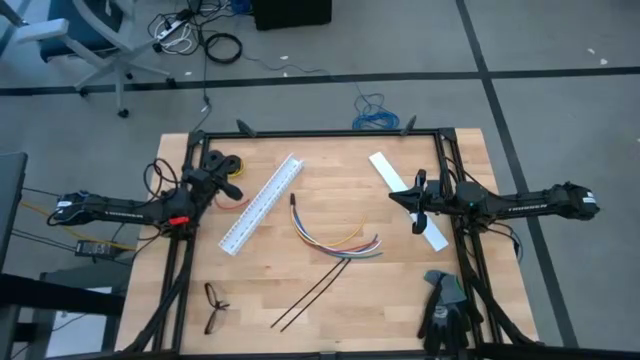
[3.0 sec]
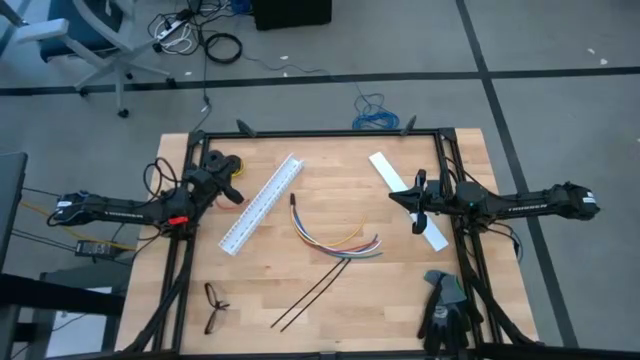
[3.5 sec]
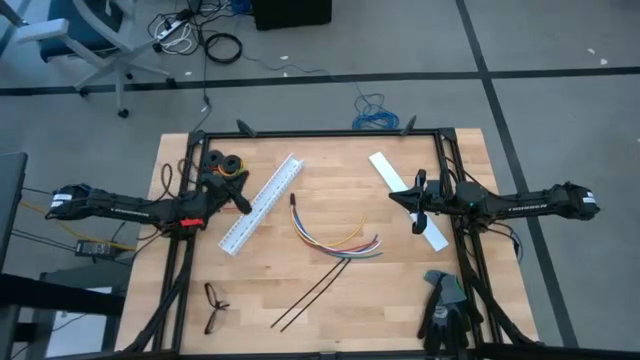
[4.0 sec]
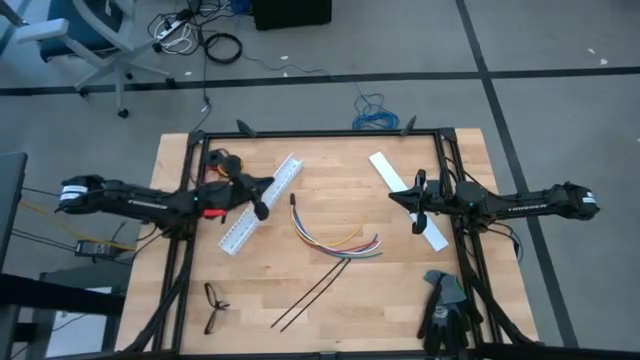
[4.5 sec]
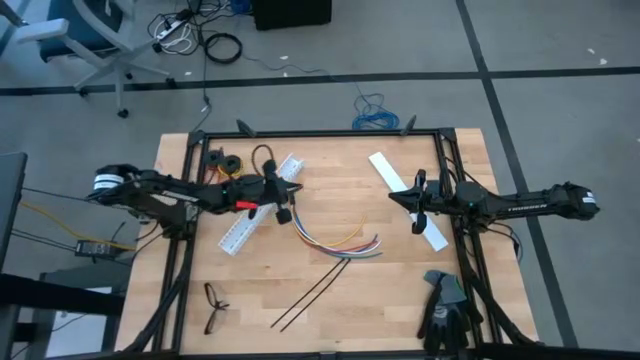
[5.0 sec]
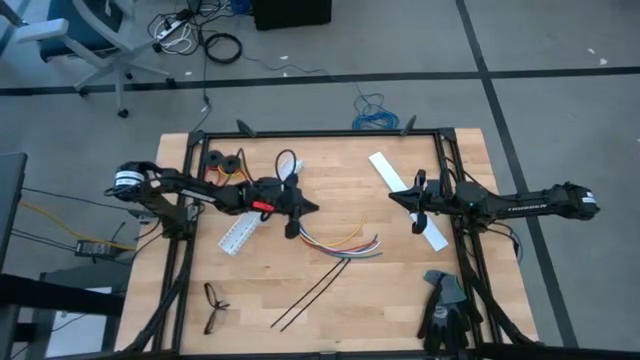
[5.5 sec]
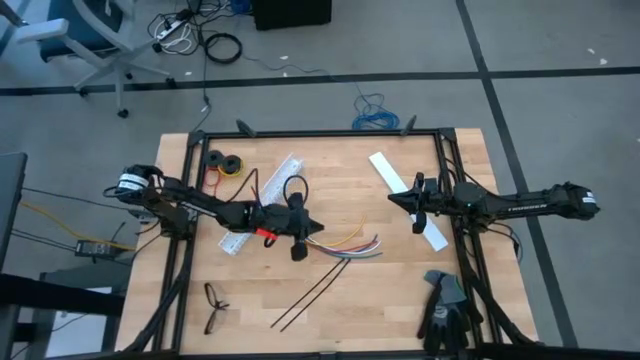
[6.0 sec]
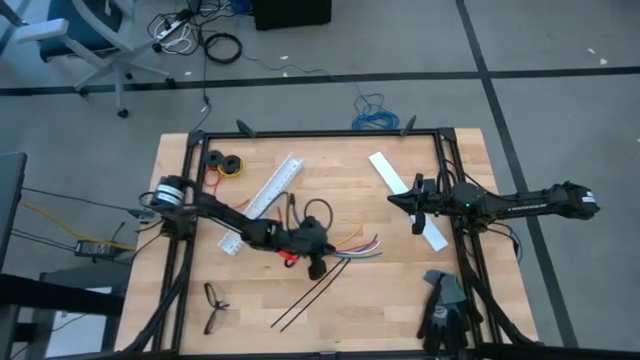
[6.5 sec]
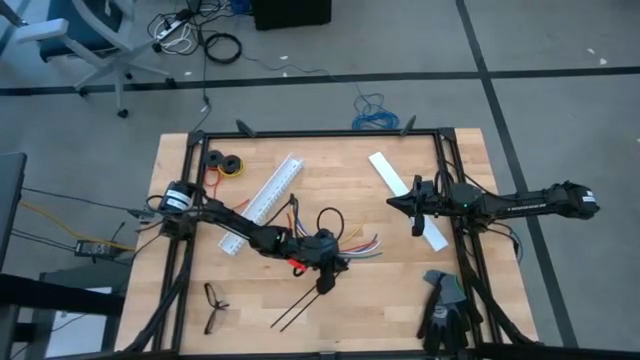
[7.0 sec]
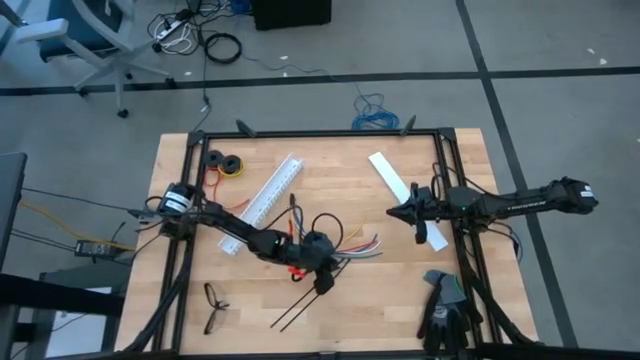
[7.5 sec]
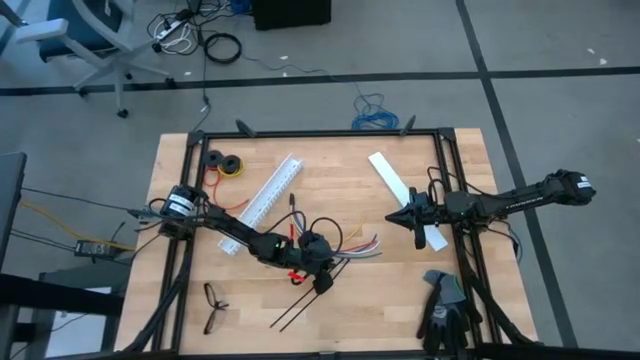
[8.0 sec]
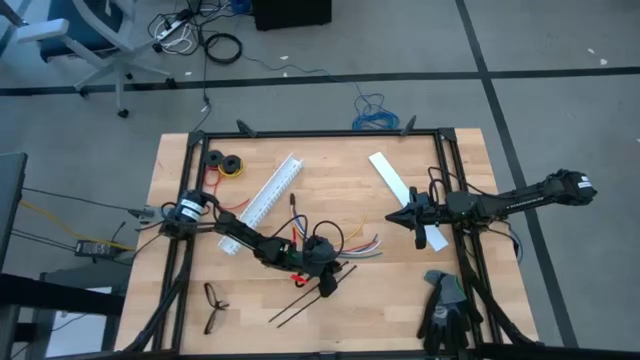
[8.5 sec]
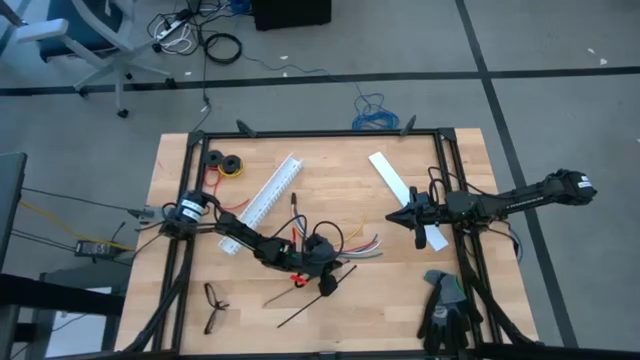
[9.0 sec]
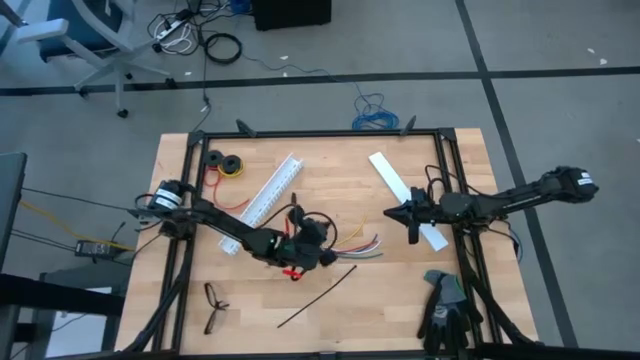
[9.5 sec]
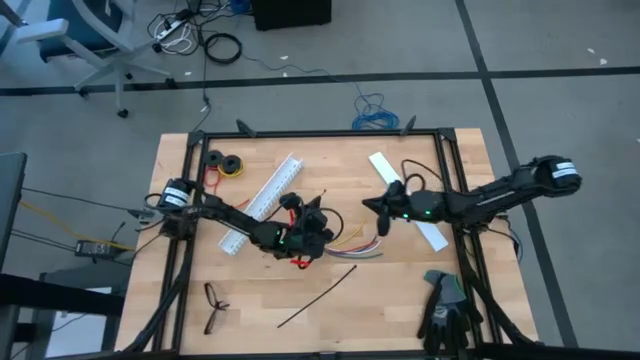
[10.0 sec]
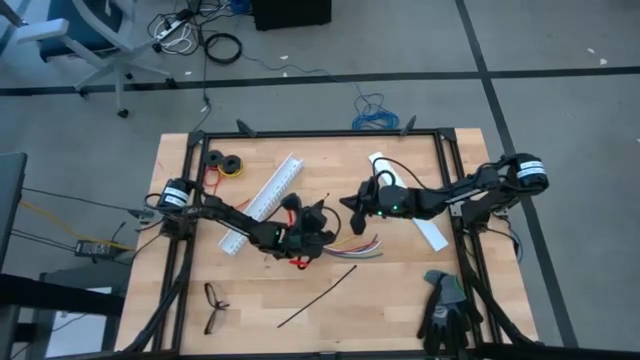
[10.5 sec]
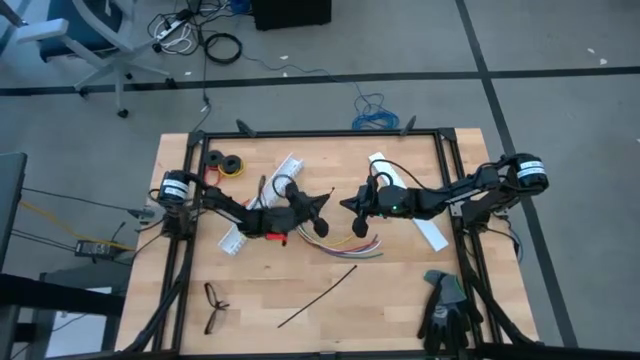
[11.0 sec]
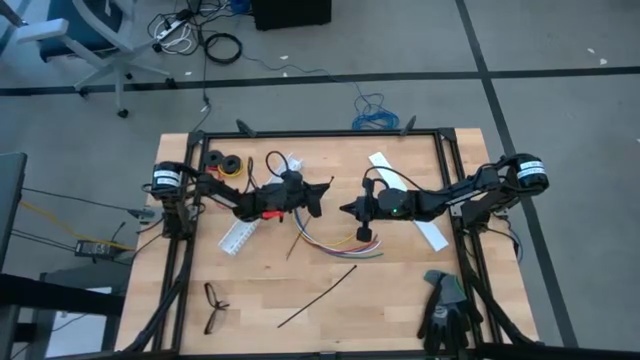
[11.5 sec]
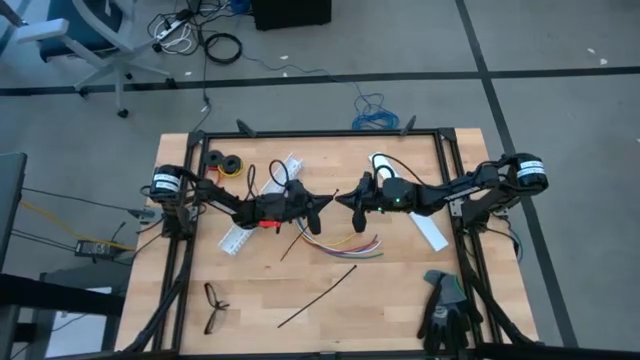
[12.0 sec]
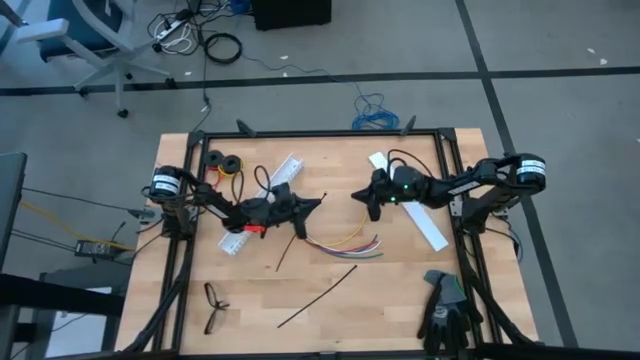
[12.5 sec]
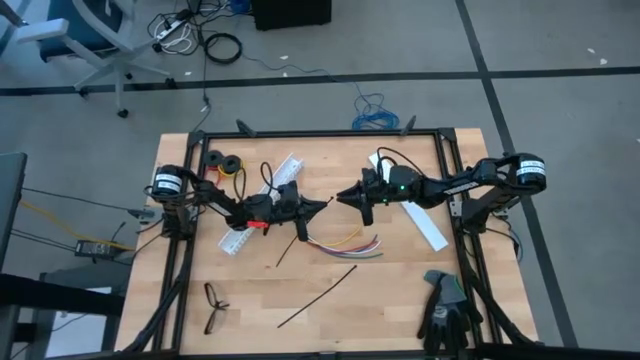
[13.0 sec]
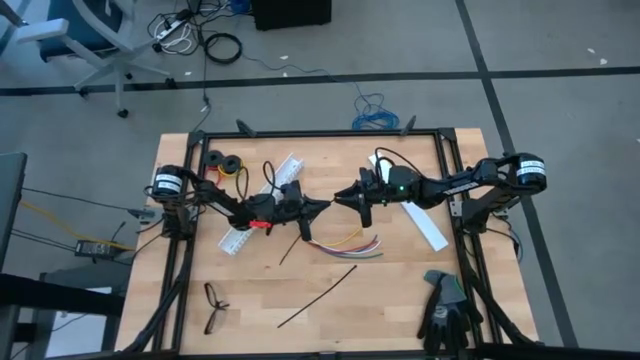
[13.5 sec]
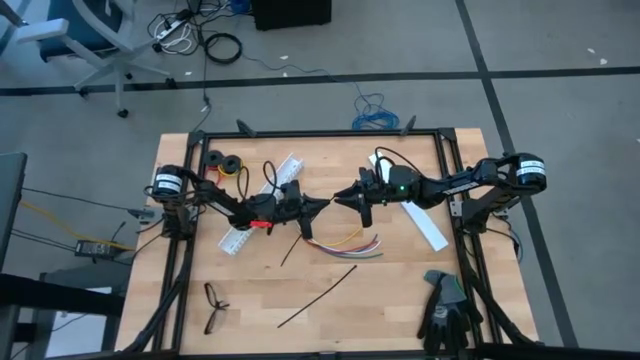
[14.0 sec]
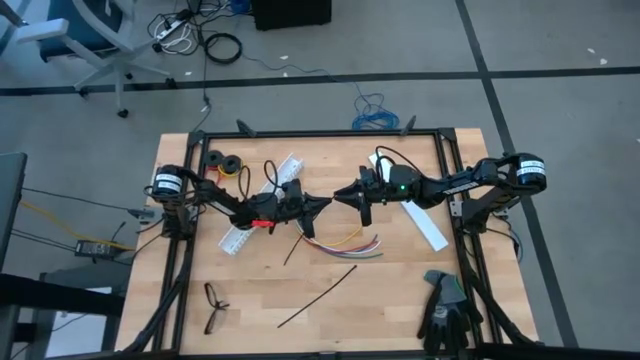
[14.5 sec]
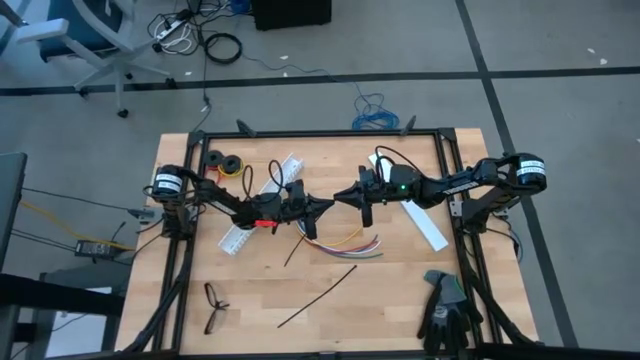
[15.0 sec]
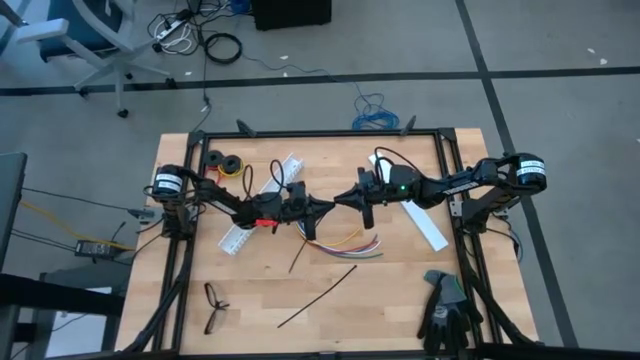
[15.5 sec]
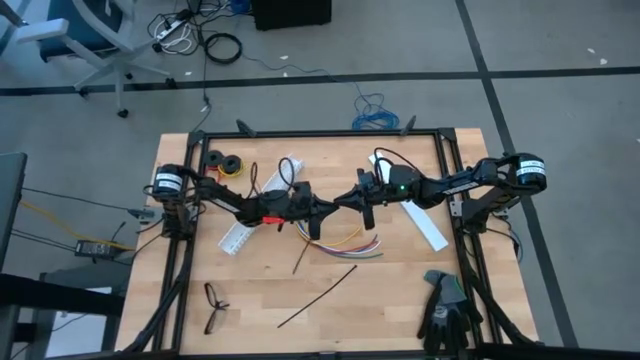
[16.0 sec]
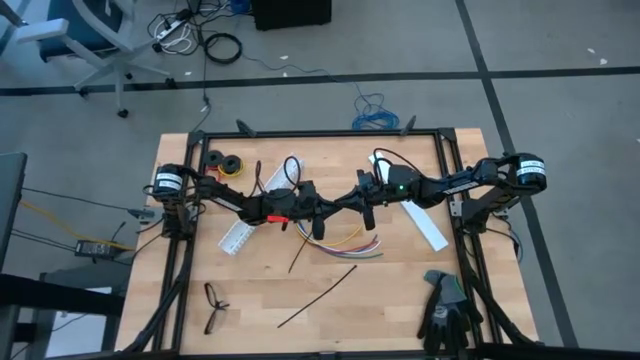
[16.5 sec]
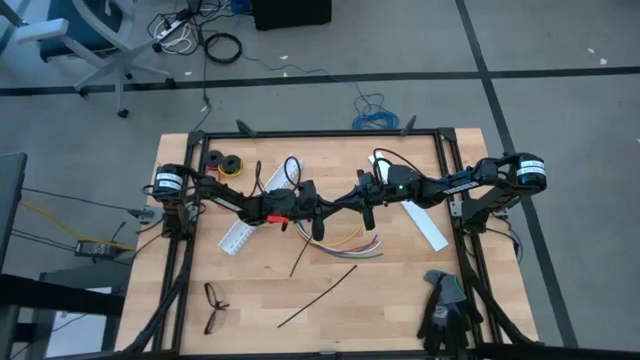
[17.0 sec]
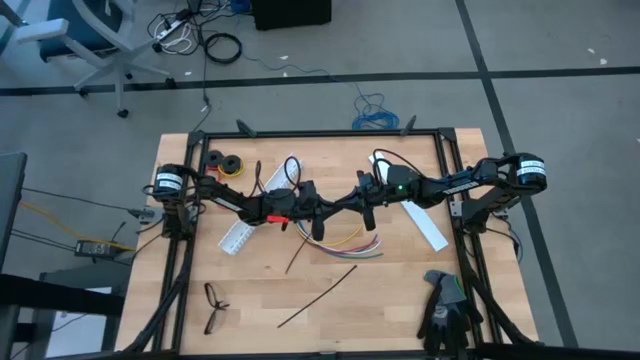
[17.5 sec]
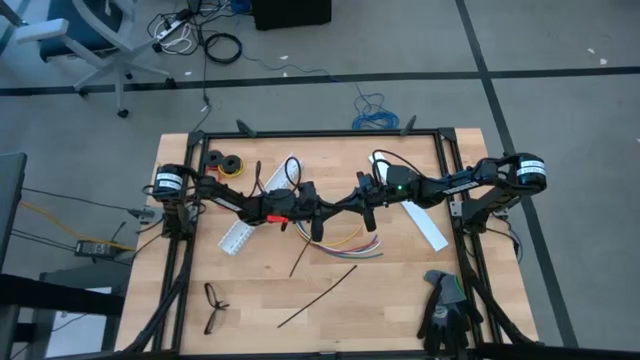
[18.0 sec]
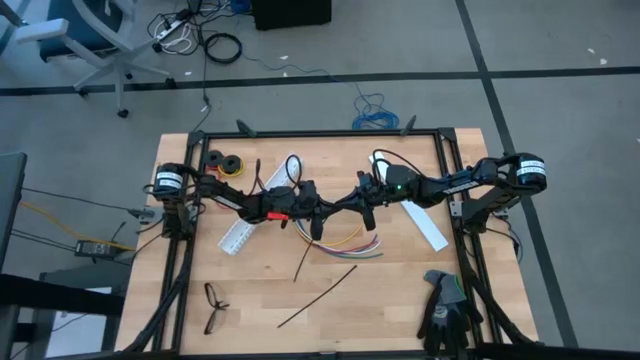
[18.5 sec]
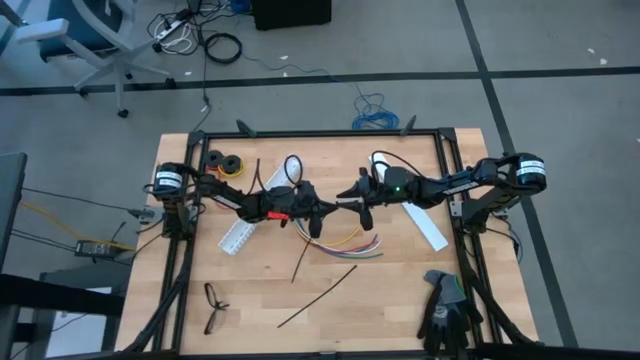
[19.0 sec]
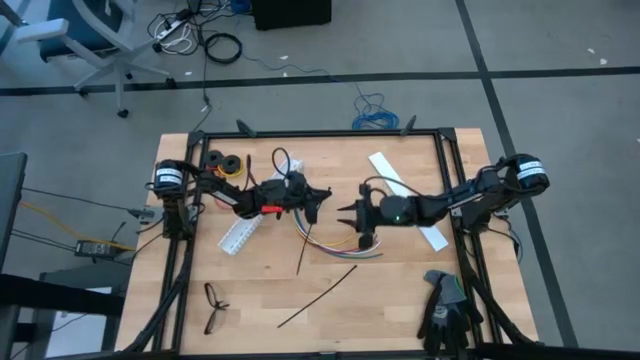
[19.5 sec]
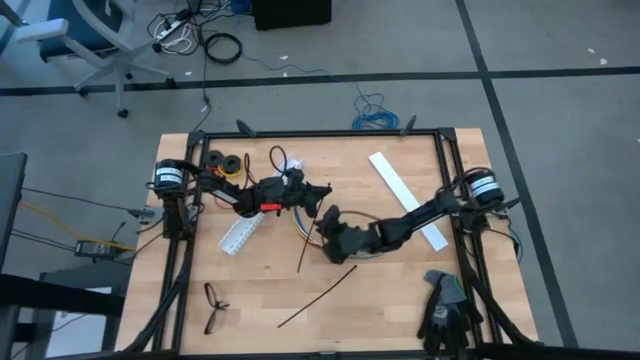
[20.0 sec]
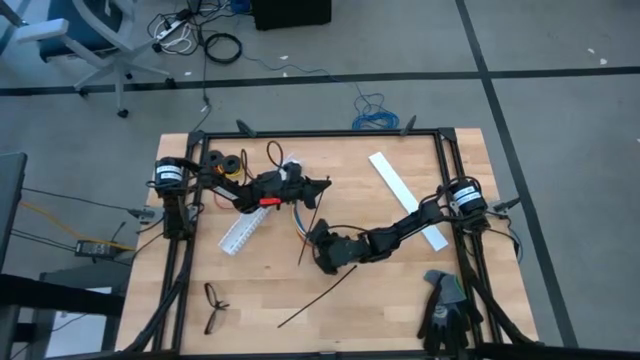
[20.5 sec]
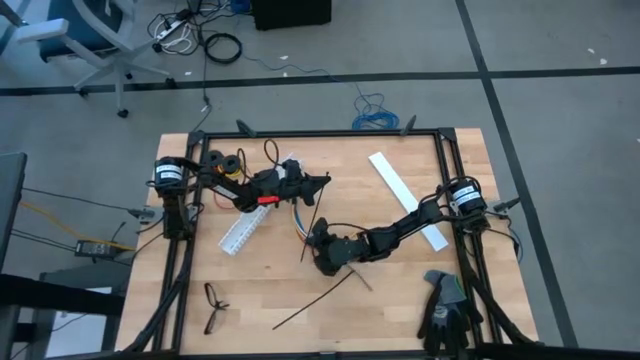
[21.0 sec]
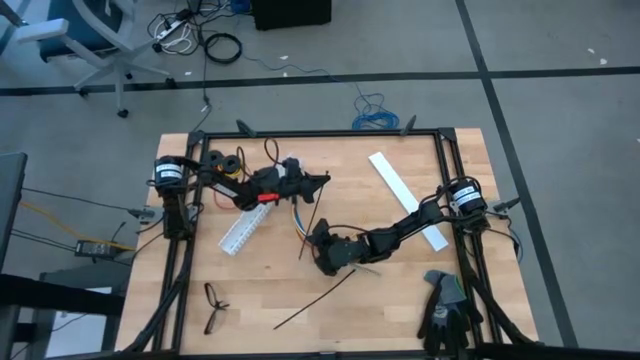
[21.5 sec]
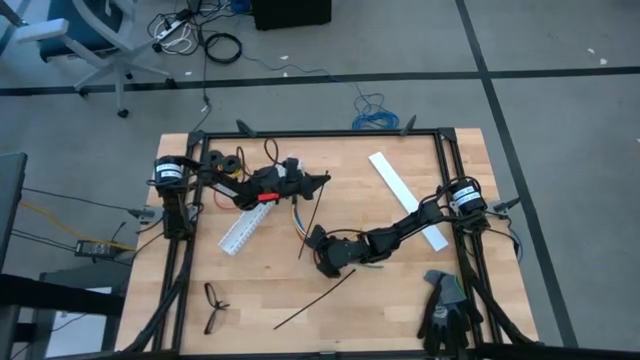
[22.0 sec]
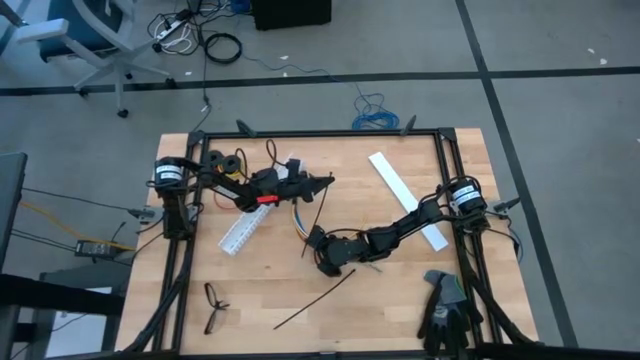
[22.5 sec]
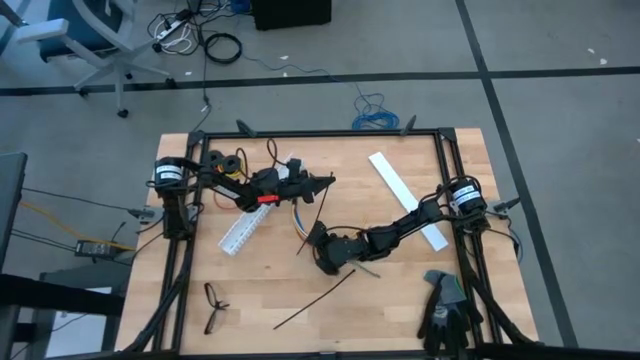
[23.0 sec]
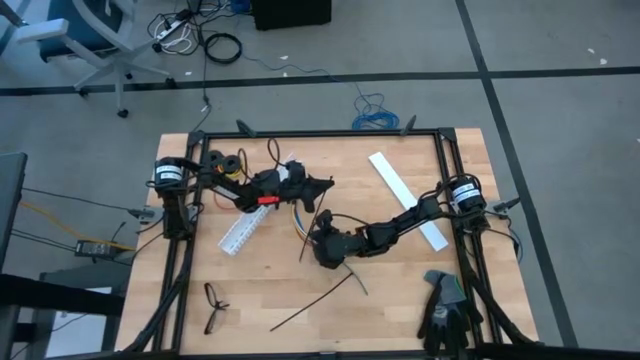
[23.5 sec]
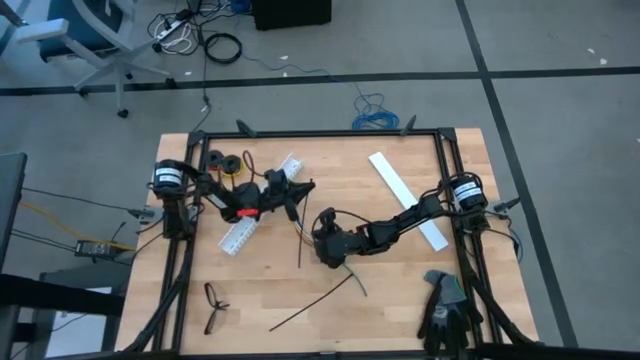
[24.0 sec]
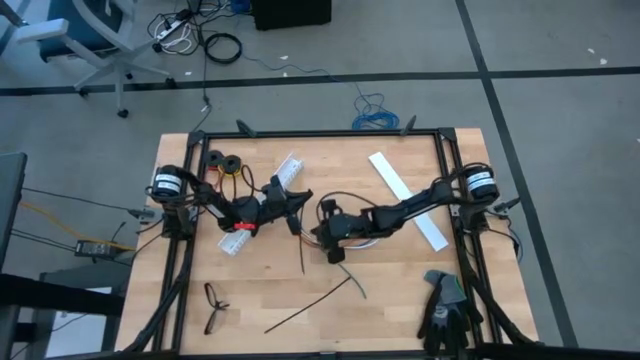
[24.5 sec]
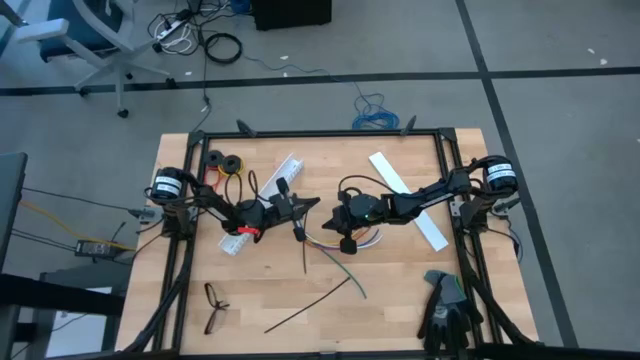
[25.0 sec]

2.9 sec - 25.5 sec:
Task: Ziptie cables
Insert the black zip tie into the lock head
